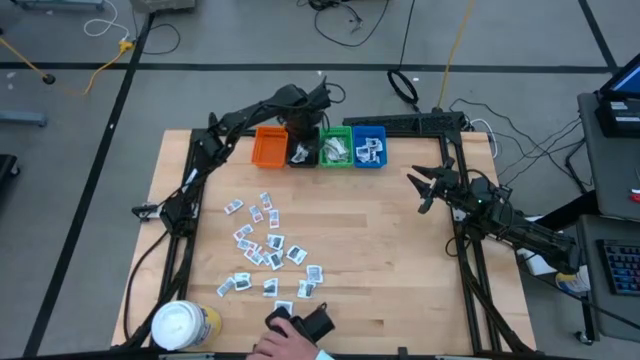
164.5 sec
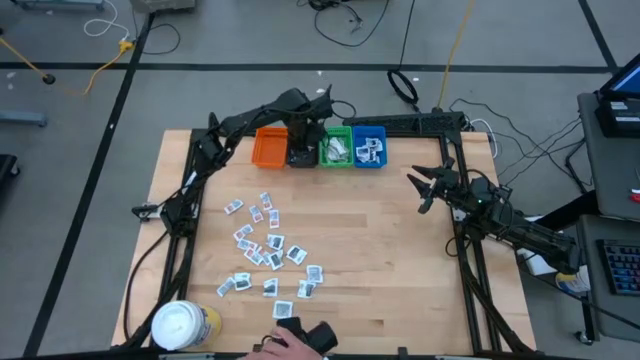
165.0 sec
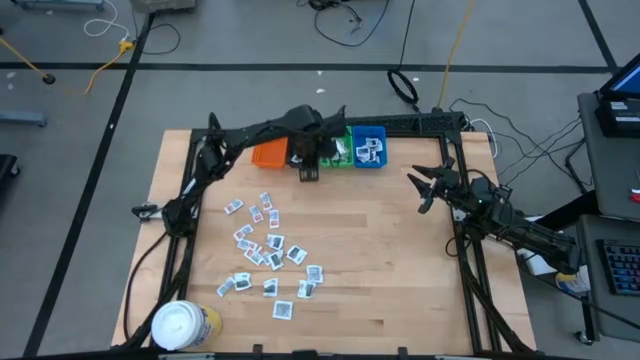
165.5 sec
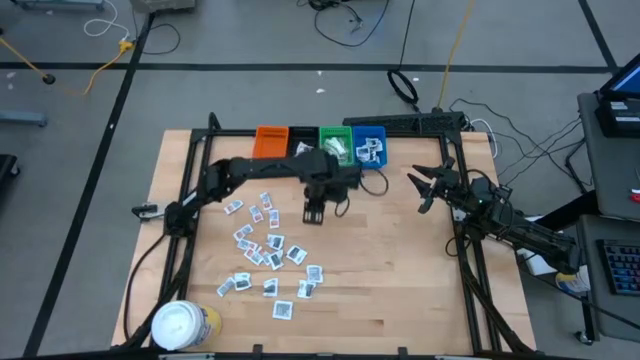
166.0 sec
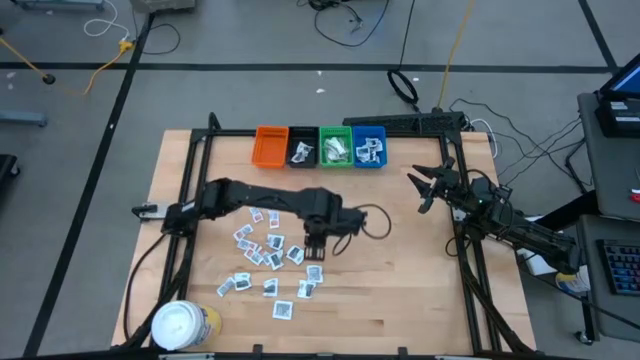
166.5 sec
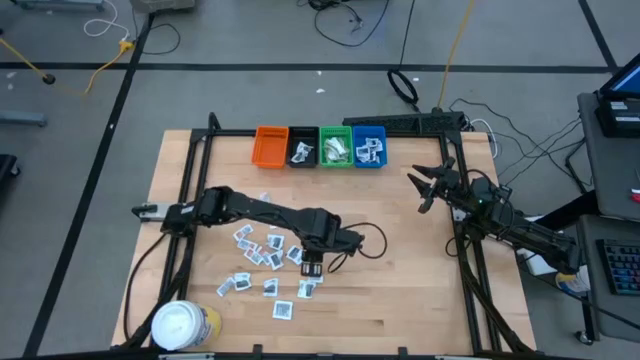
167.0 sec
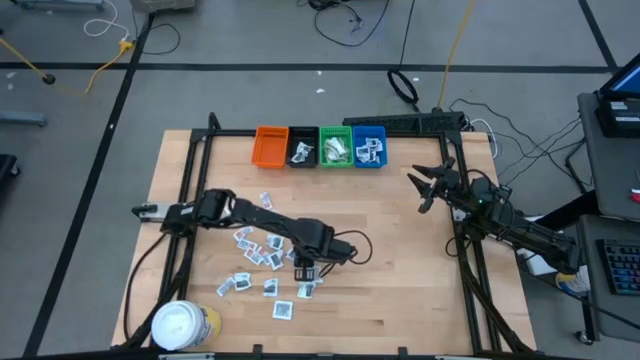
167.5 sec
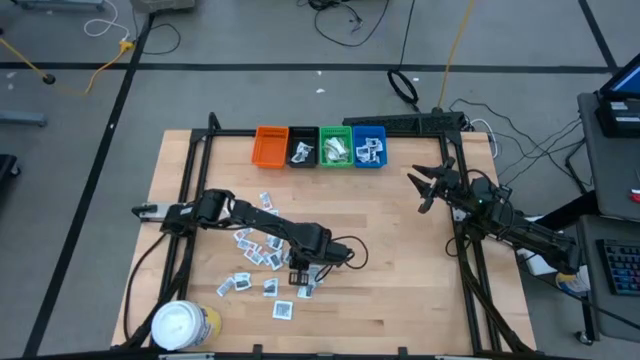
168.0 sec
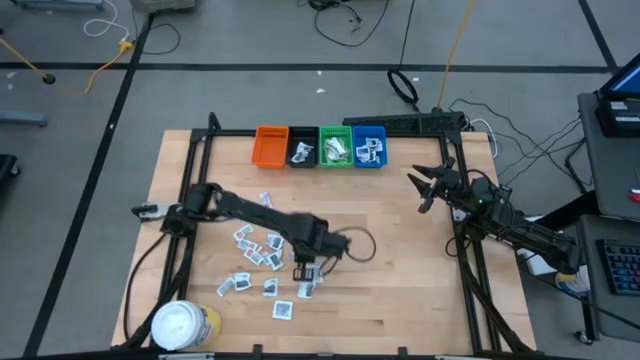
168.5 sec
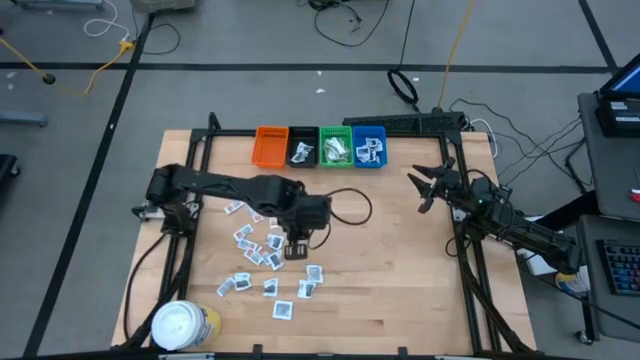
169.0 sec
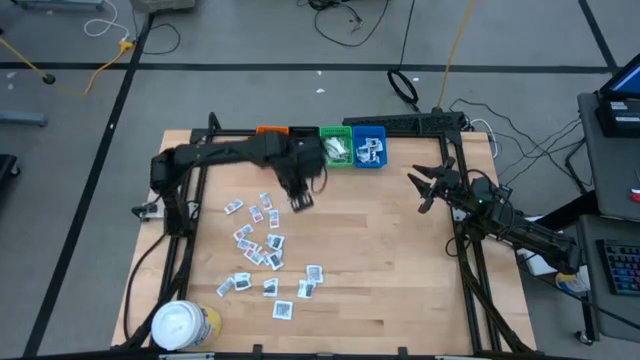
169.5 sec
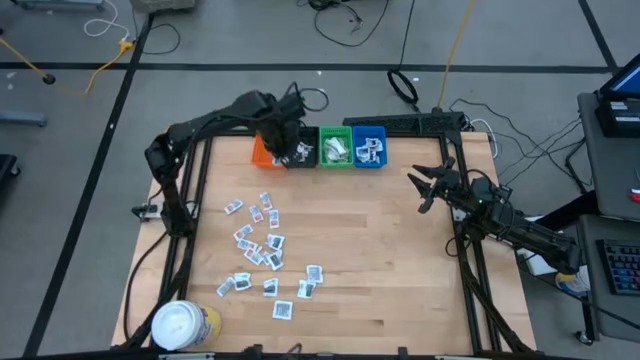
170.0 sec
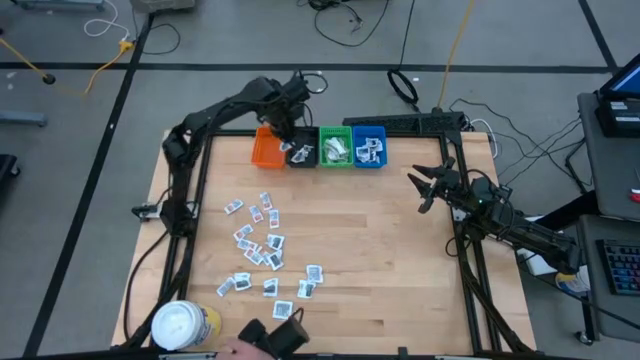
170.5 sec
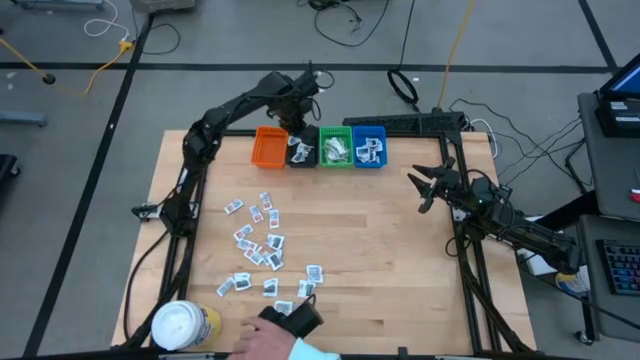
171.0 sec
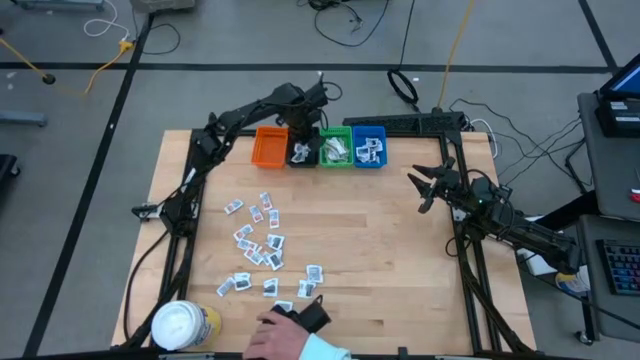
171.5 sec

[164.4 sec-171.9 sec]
Task: Pick & Place First Aid Supplies
Put the blue packet into the black bin

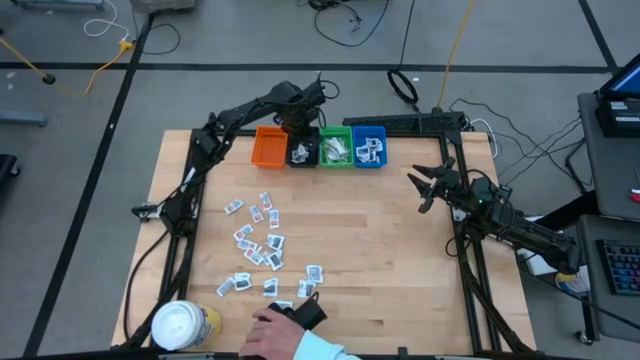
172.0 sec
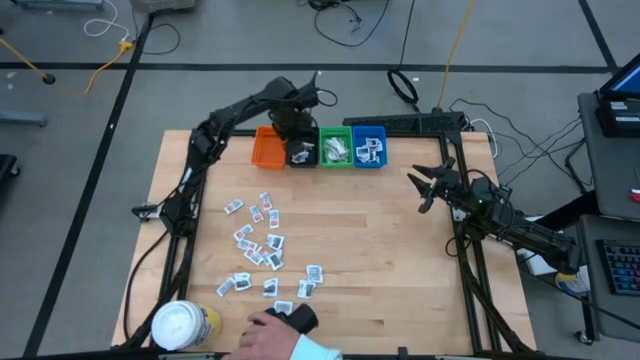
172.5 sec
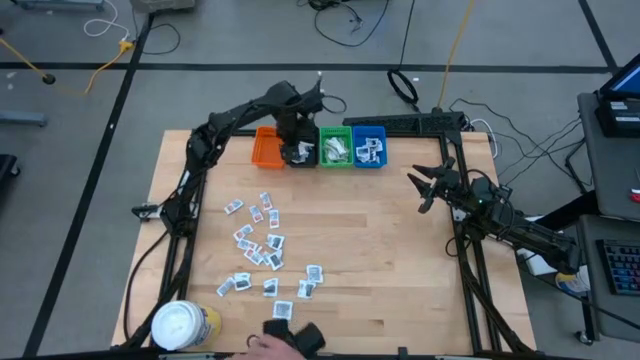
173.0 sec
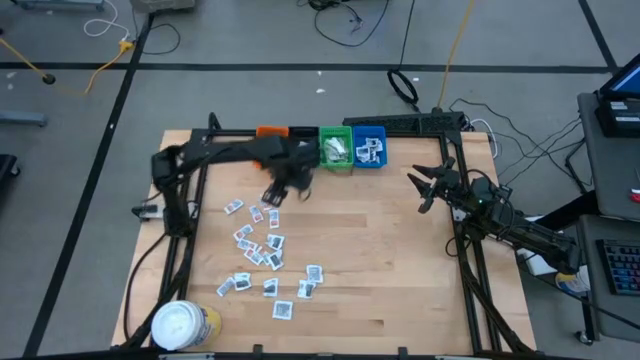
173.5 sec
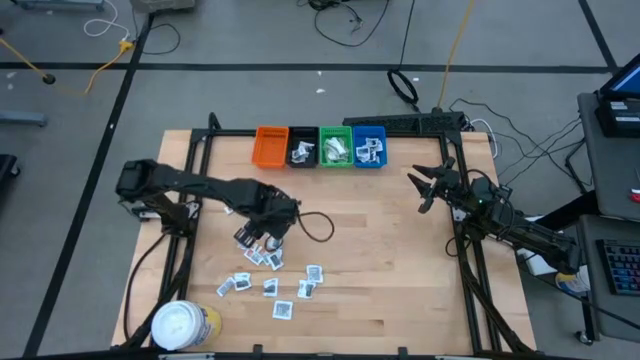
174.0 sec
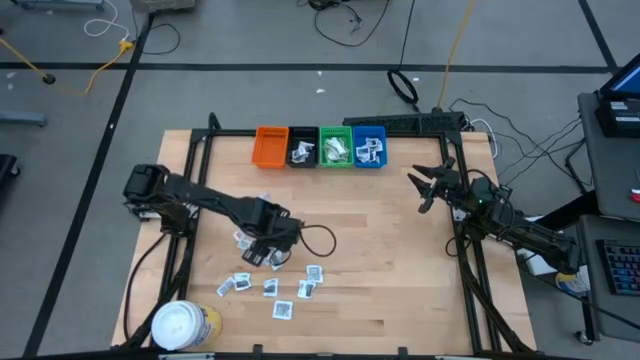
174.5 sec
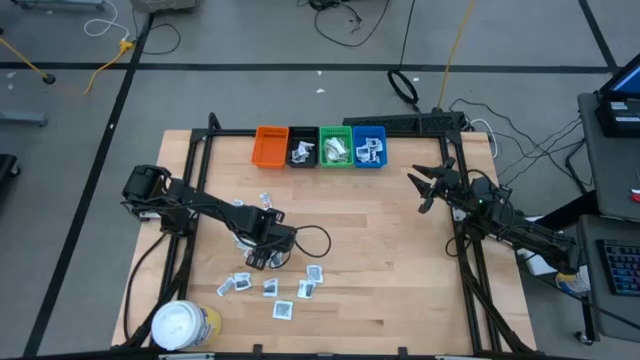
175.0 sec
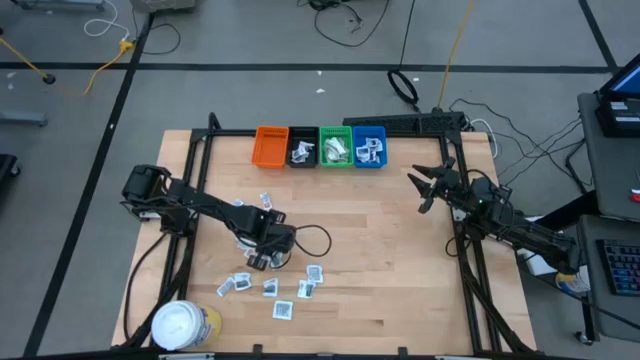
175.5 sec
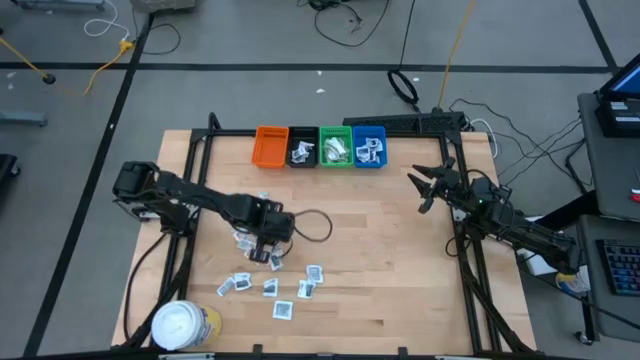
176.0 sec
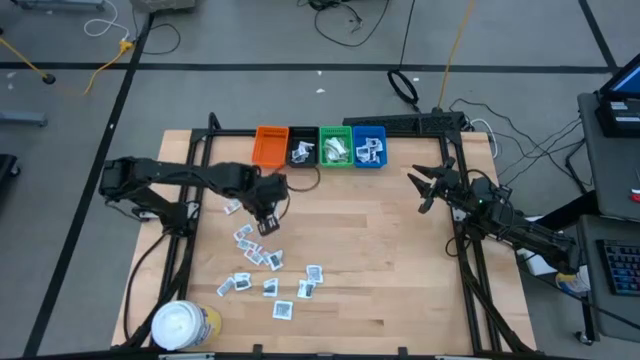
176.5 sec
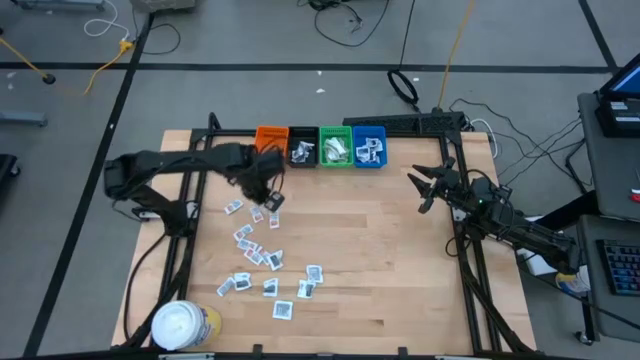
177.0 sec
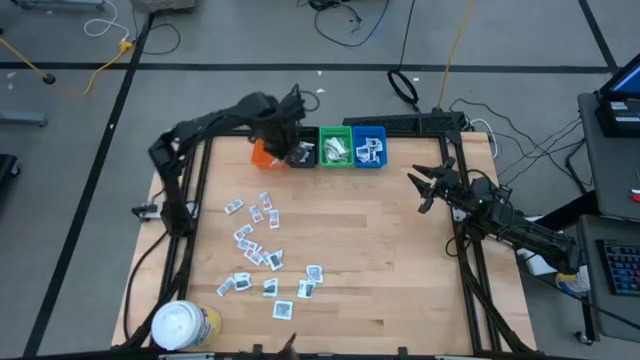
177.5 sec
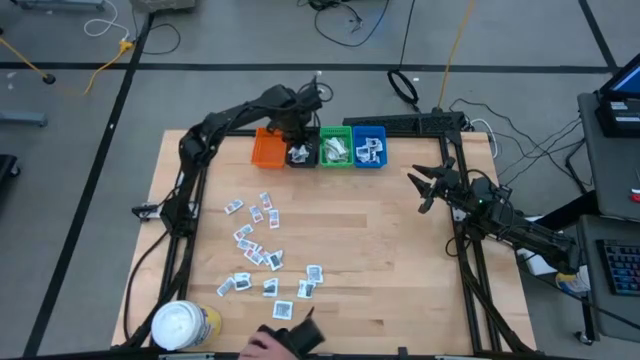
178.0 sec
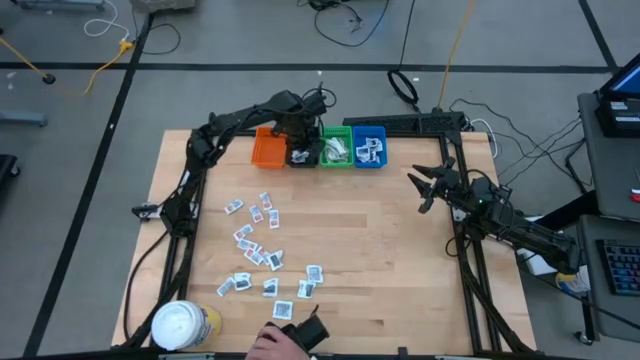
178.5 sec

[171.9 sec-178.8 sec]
Put the blue packet into the black bin

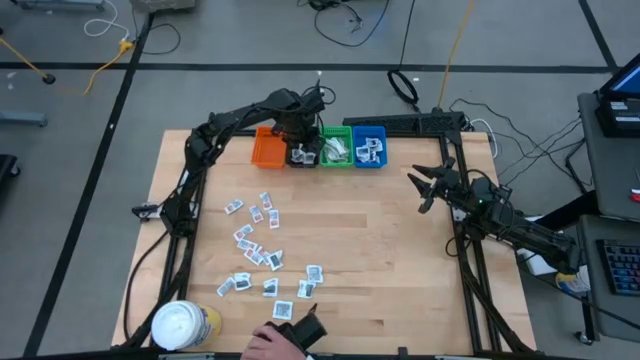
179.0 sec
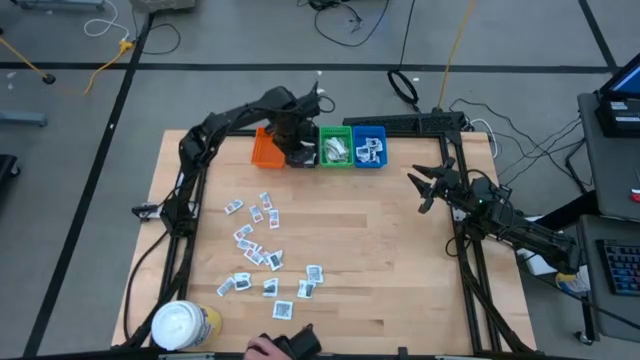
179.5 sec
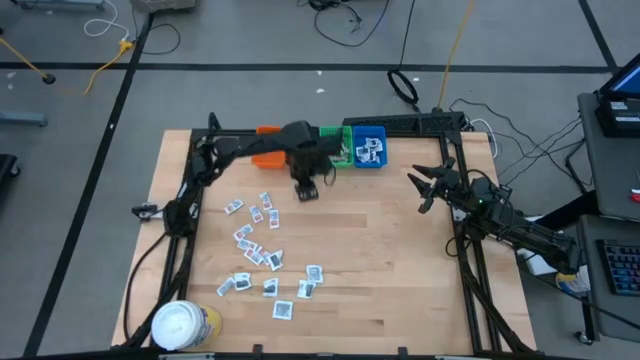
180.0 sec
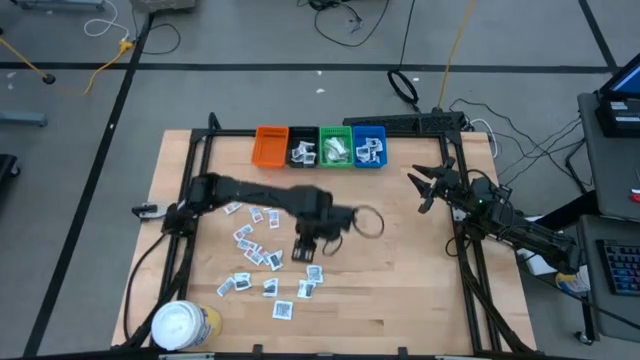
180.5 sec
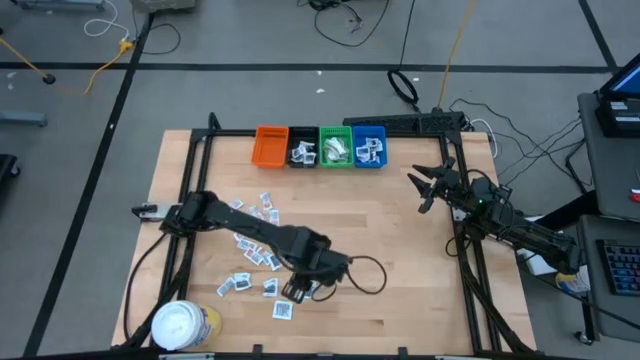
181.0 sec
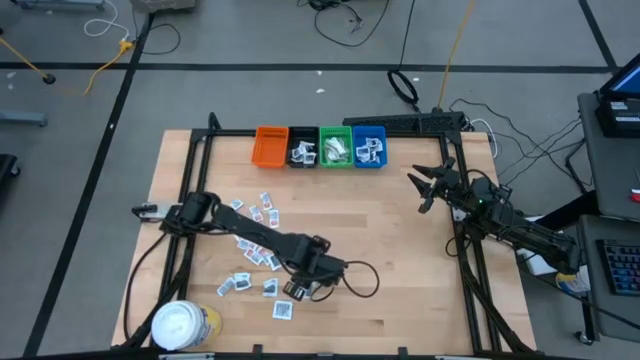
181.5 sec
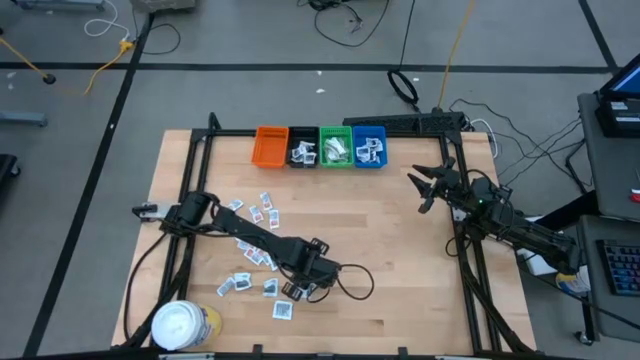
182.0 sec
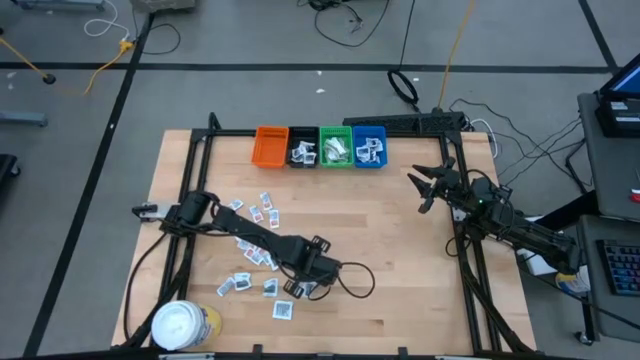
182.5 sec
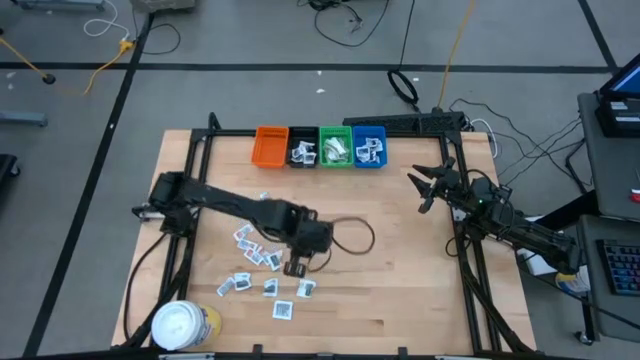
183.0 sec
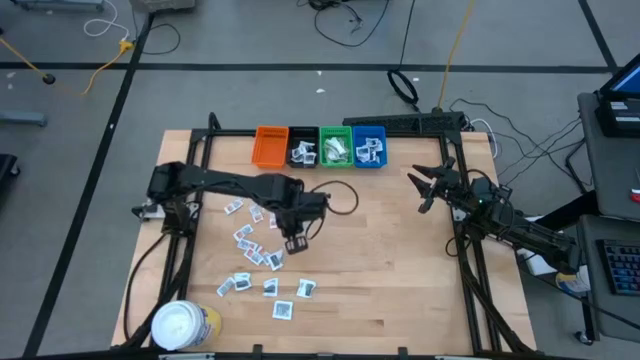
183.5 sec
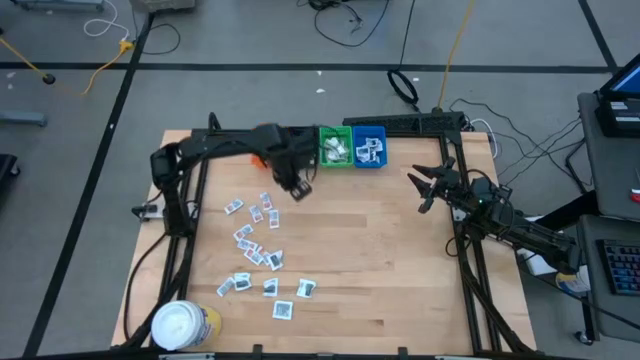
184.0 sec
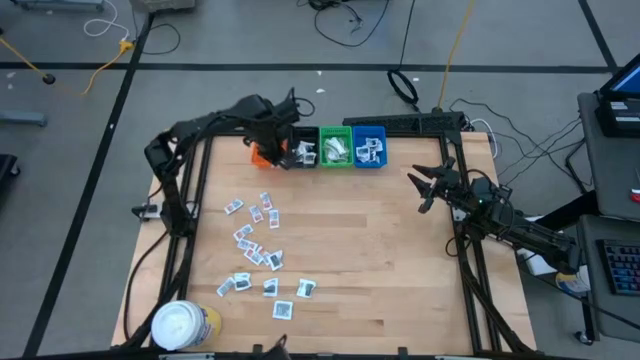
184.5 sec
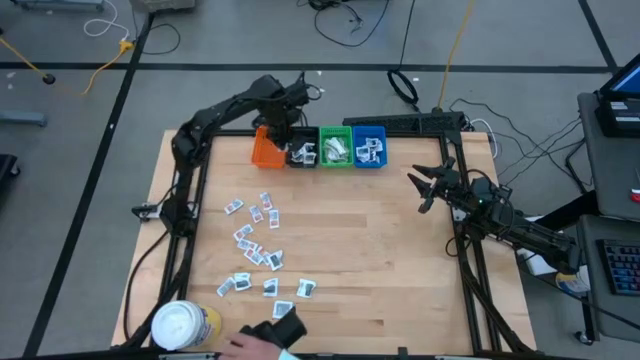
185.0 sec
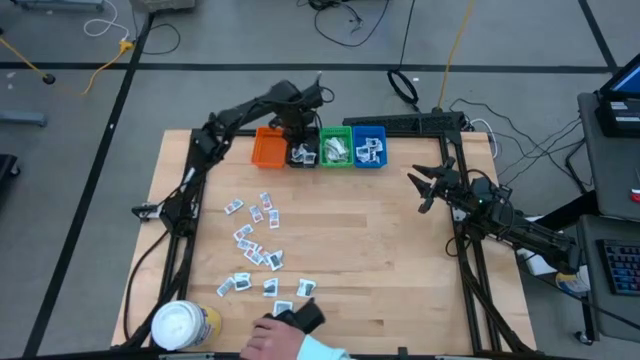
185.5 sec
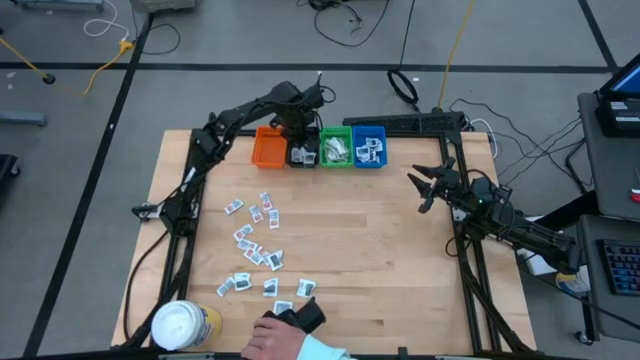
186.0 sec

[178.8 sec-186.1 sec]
Put the blue packet into the black bin
